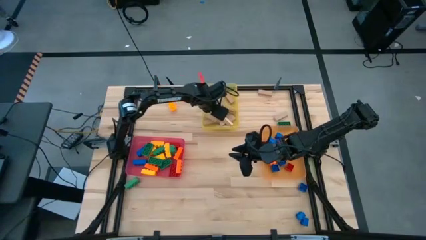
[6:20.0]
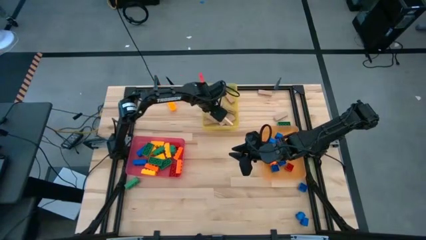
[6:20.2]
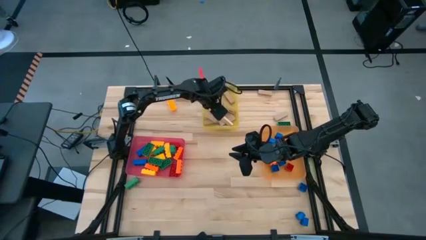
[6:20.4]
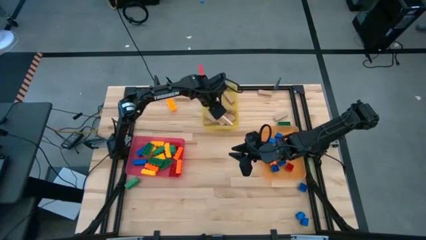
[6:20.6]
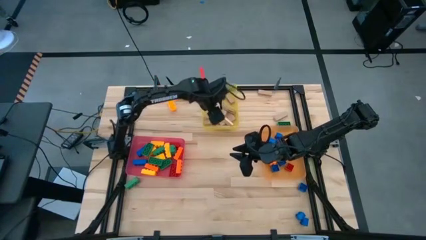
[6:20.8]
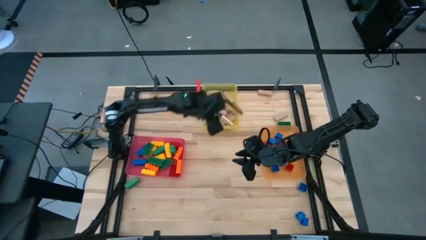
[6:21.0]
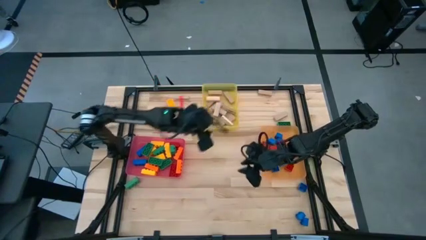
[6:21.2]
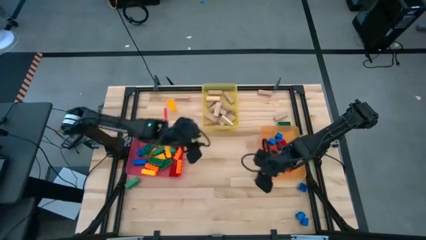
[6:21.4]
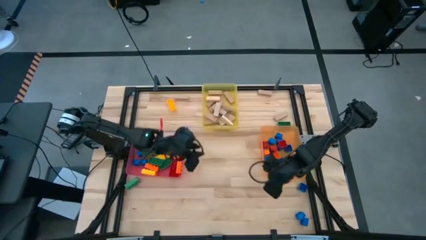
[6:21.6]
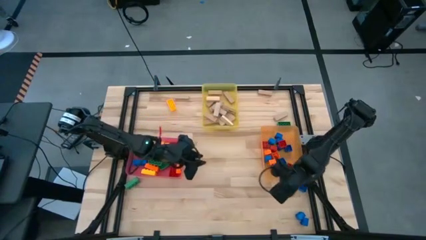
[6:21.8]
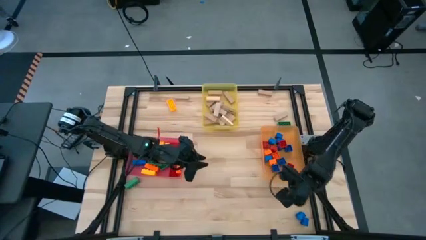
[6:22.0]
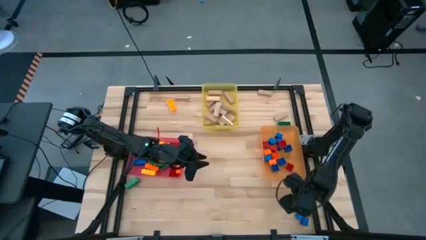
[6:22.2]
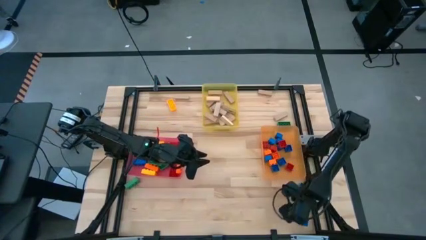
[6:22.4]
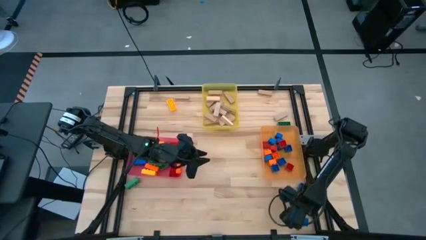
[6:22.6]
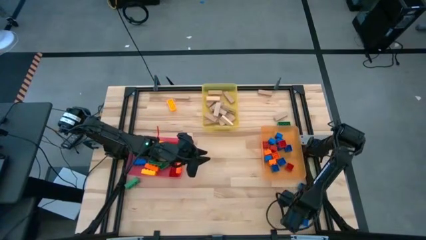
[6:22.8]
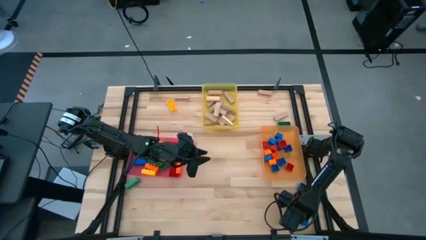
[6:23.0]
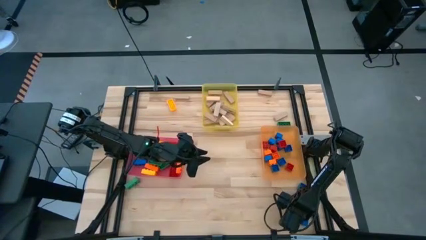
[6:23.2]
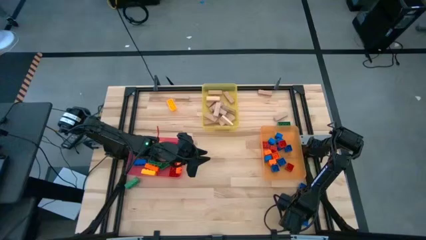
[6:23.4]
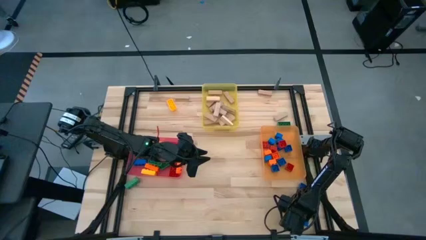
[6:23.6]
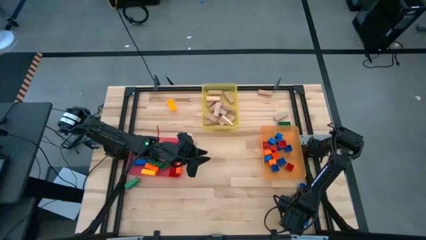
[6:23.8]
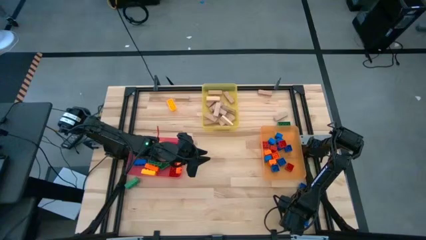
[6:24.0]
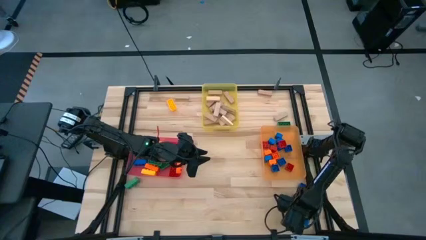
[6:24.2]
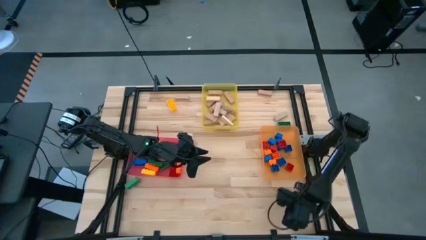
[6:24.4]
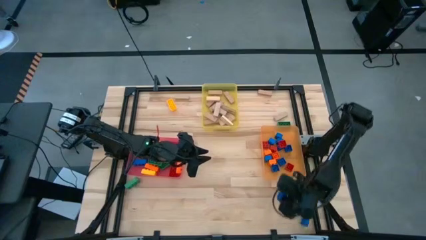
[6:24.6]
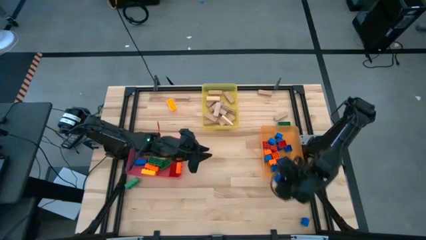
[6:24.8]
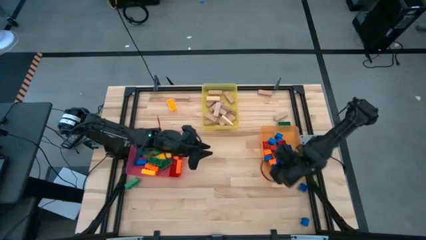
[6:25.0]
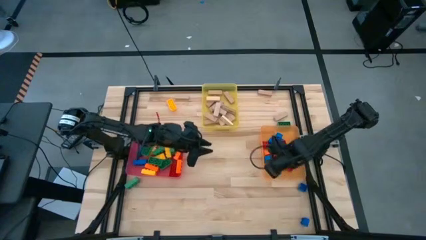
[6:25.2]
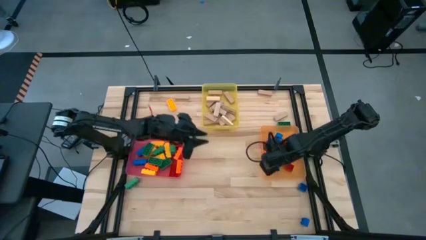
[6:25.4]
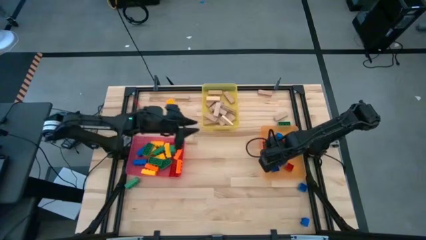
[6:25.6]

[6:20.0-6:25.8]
Task: Sort blocks by size
Put the 1 stud blue game piece into the orange bin

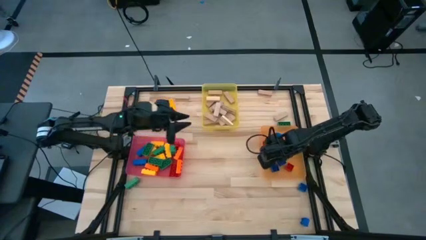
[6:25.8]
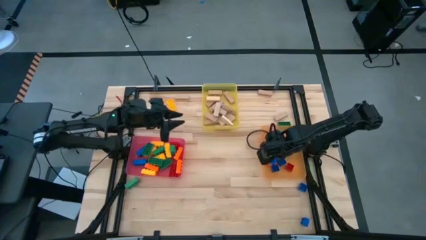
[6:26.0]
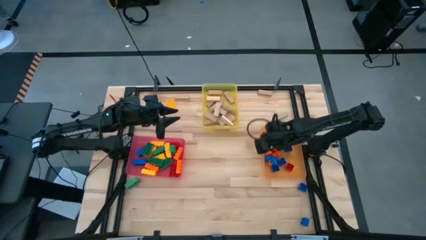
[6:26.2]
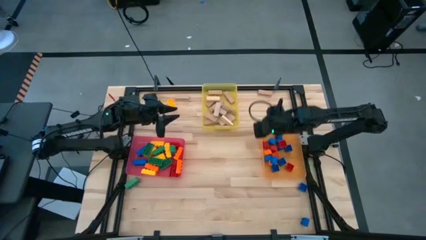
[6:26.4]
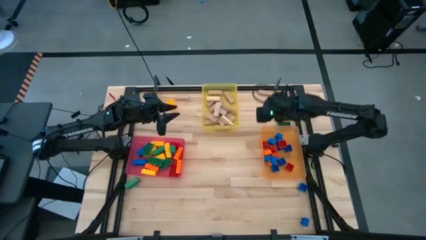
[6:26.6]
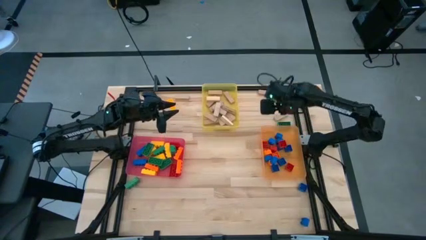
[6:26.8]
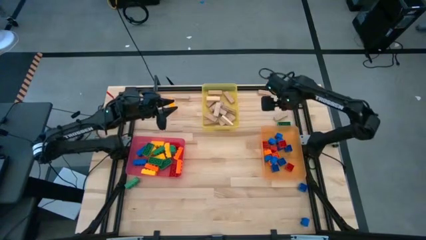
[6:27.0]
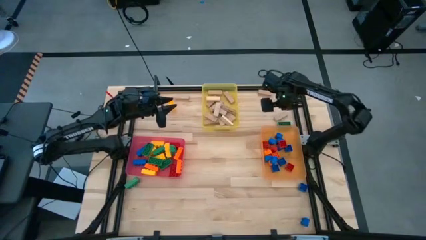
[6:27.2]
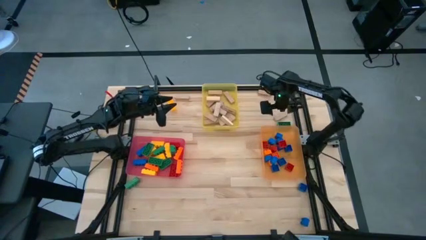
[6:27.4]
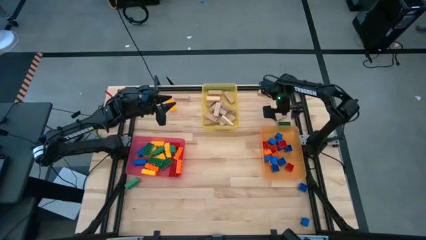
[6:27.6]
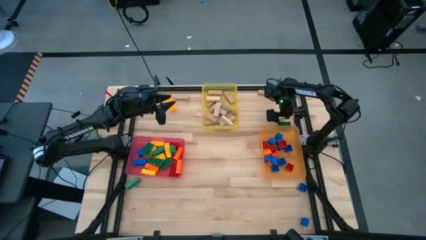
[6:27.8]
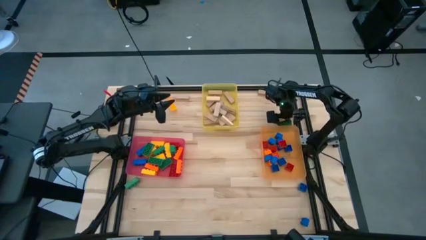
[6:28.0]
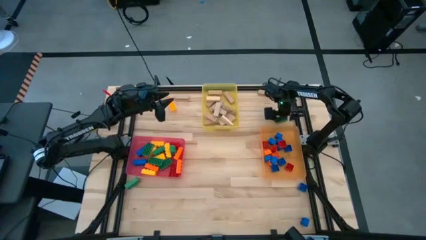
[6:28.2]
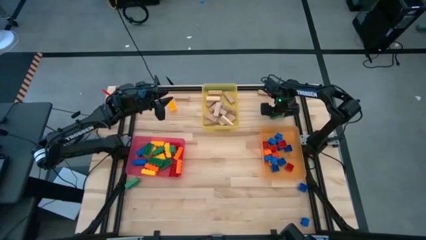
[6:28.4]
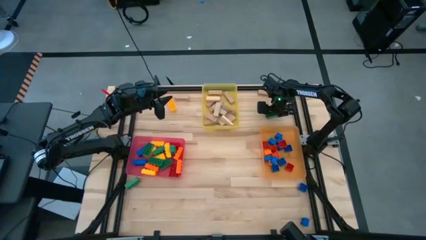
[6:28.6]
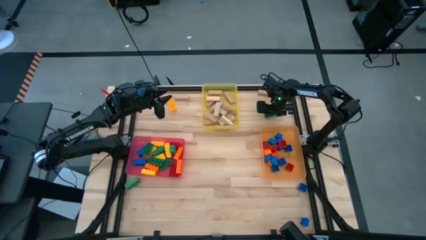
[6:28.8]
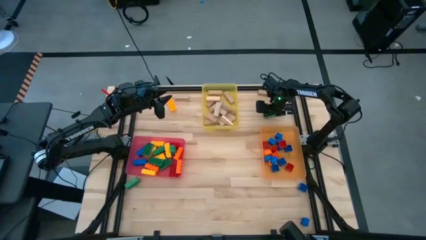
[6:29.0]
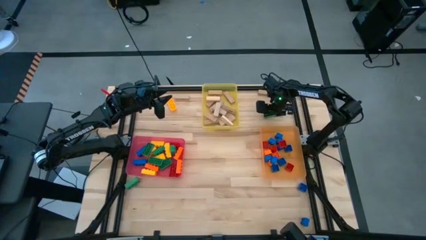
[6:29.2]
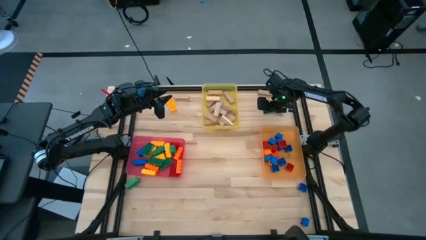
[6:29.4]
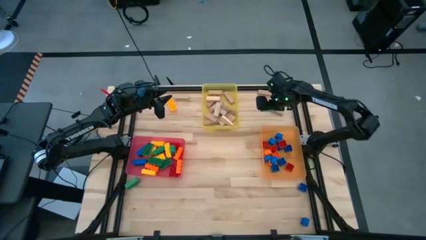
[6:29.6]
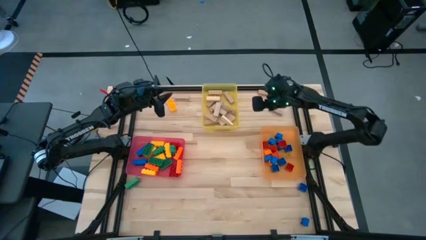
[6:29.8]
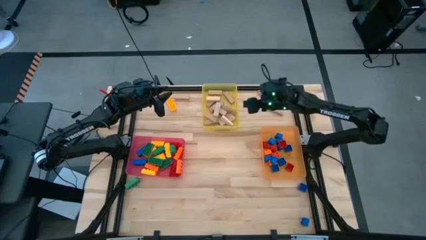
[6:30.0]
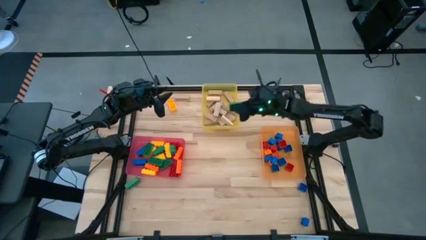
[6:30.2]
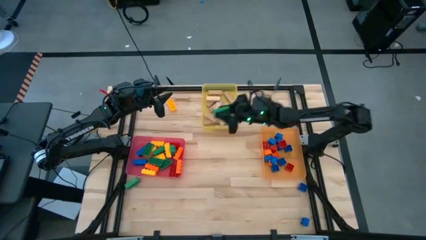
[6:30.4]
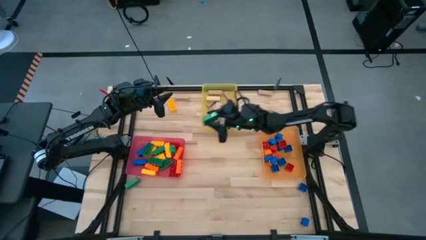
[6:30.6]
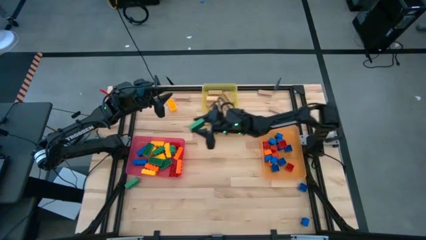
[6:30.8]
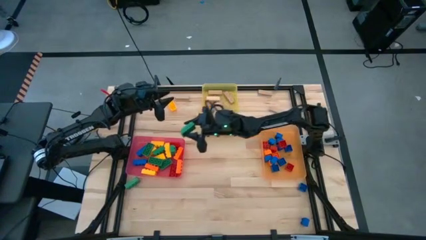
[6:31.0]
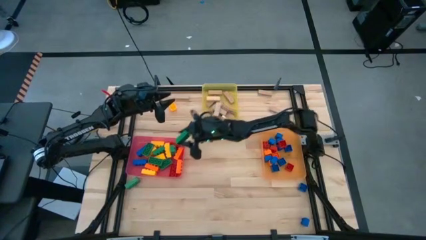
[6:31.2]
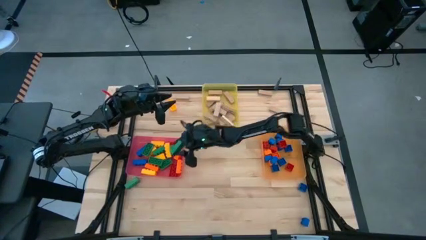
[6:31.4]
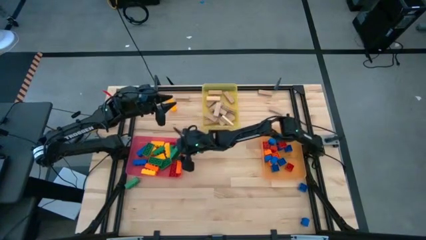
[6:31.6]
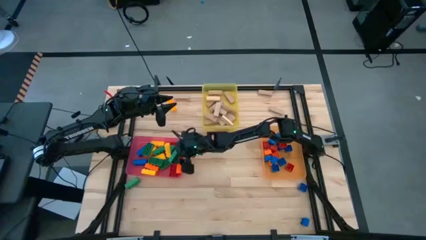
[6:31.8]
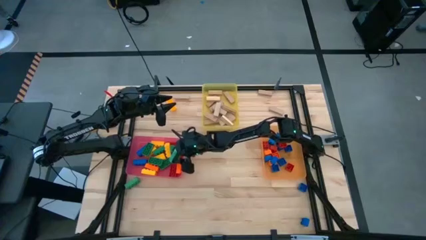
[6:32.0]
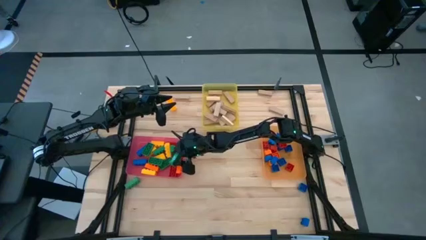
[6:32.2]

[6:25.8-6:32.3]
Put the 3 stud green game piece into the pink bin

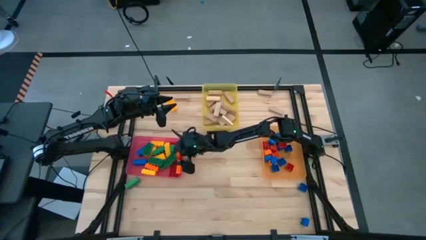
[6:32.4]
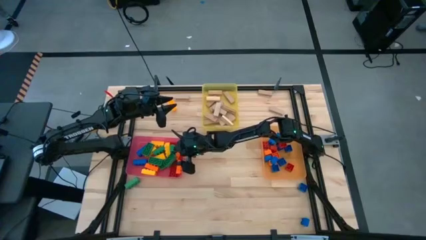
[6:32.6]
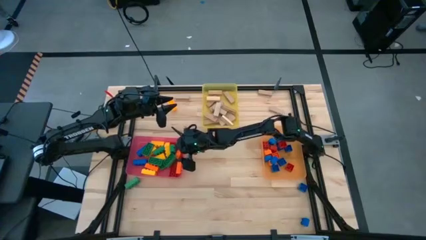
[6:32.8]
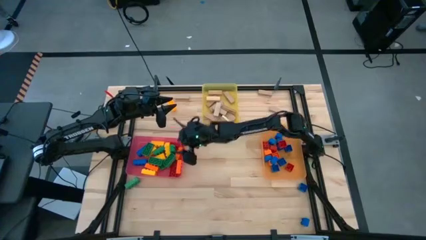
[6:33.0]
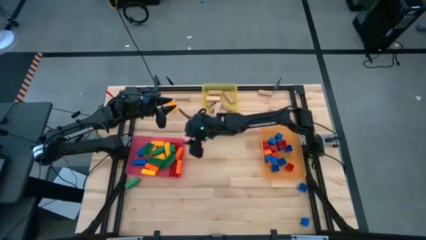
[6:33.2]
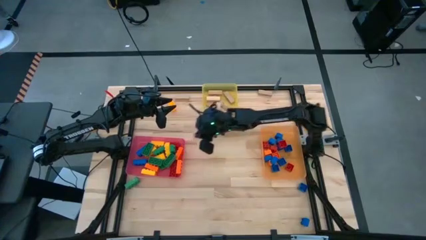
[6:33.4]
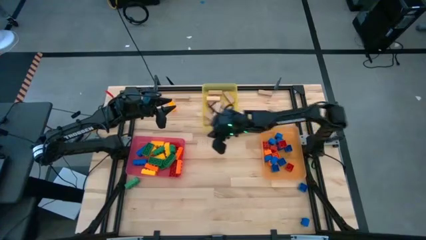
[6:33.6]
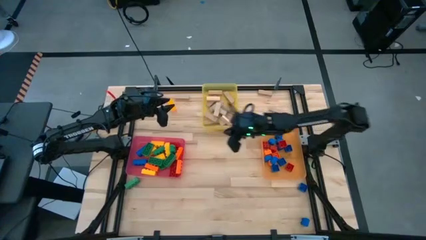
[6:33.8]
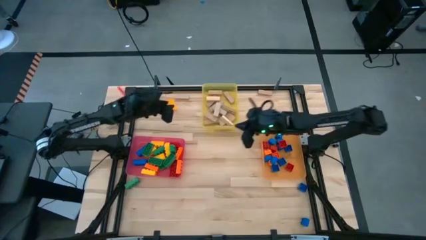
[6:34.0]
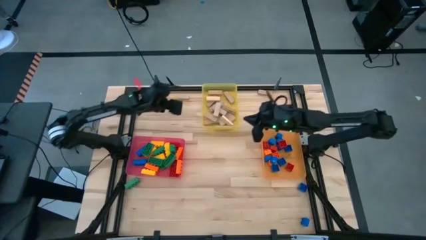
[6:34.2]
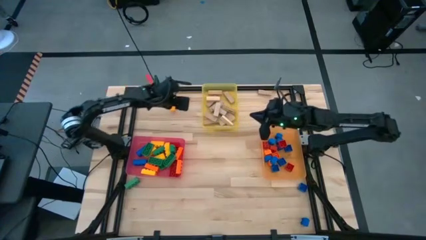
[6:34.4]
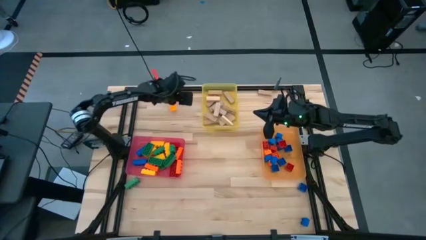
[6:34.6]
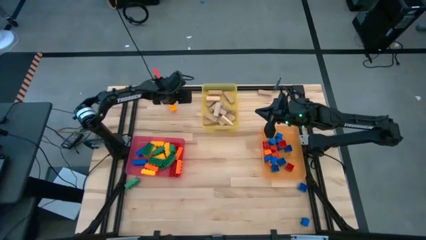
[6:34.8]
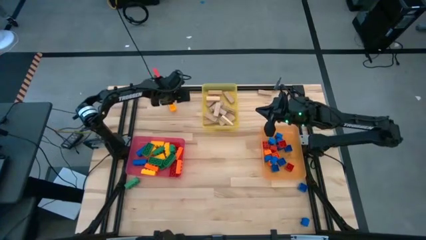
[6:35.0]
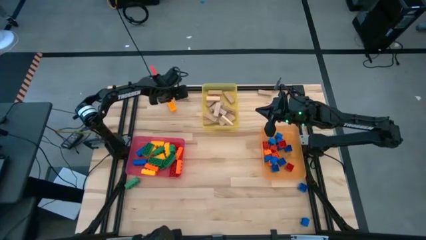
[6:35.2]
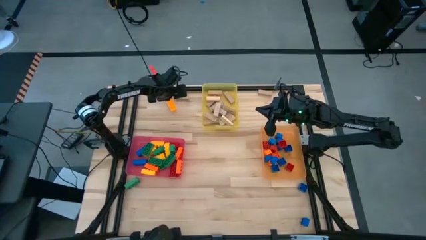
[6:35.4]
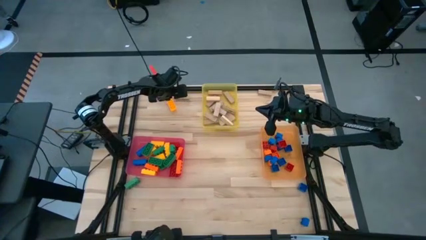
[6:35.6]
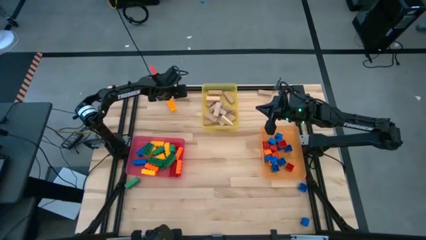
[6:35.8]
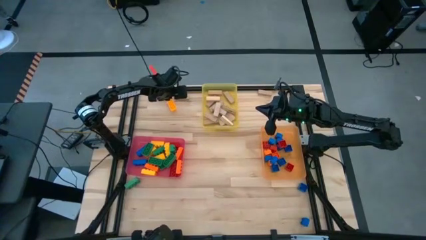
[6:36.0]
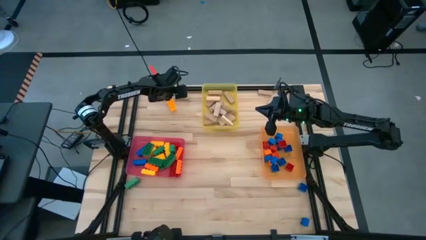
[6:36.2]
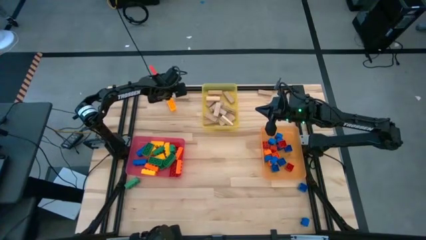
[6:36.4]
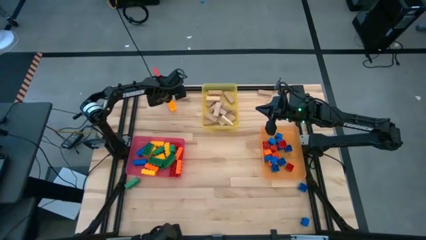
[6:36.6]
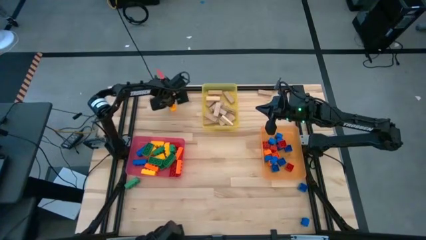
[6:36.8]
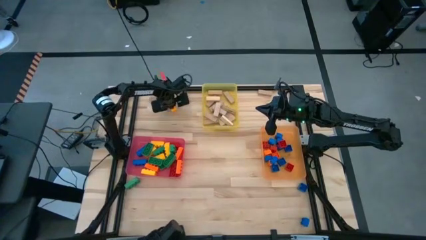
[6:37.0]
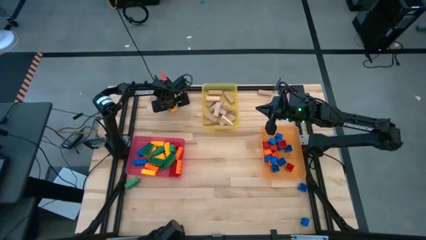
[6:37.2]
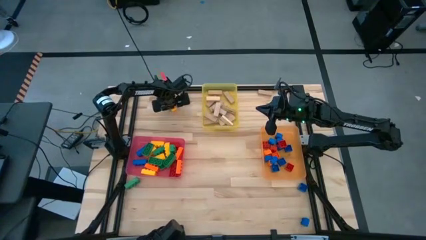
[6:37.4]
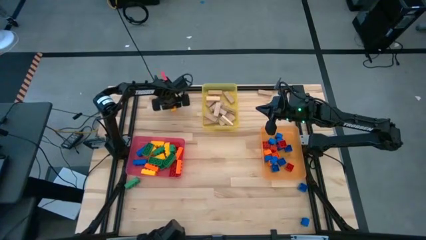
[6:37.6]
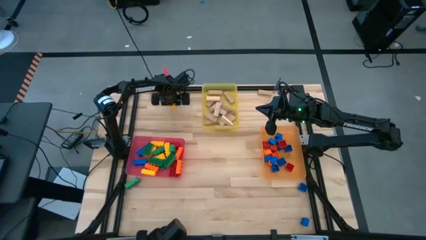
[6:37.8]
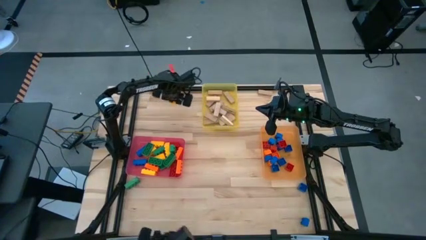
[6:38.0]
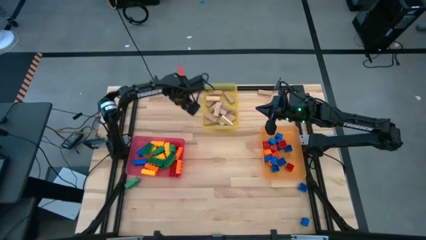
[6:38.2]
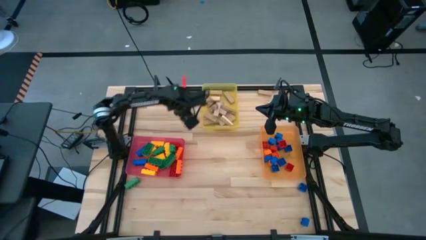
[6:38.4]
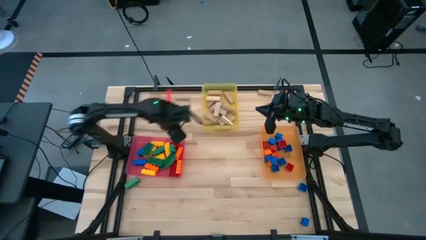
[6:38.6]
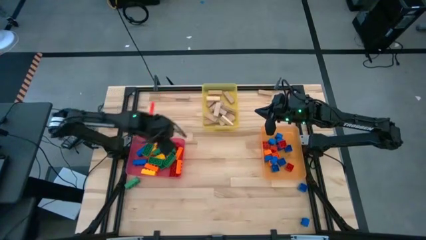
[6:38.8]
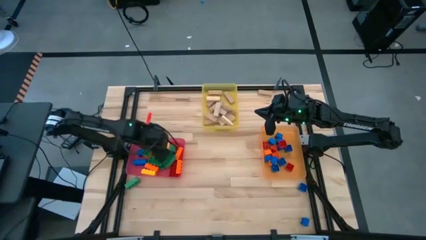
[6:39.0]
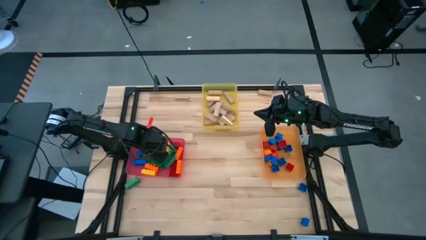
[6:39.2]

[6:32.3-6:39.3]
Put the 3 stud yellow game piece into the pink bin
